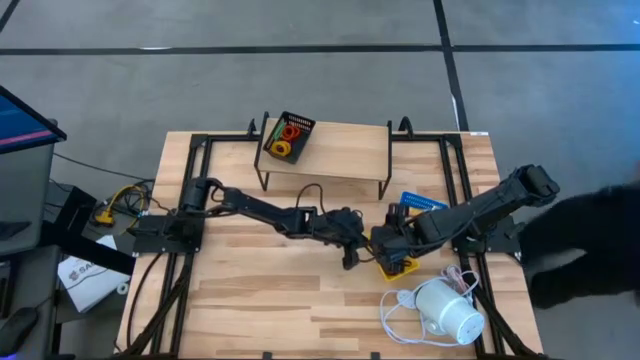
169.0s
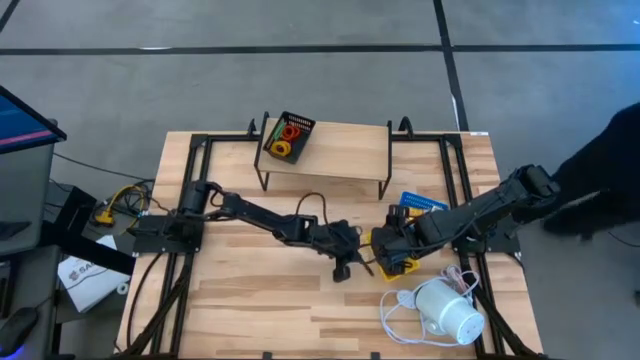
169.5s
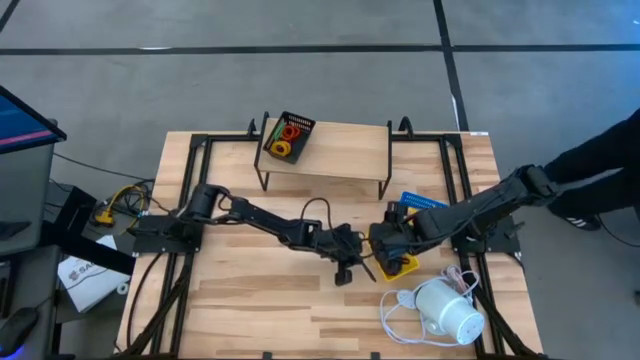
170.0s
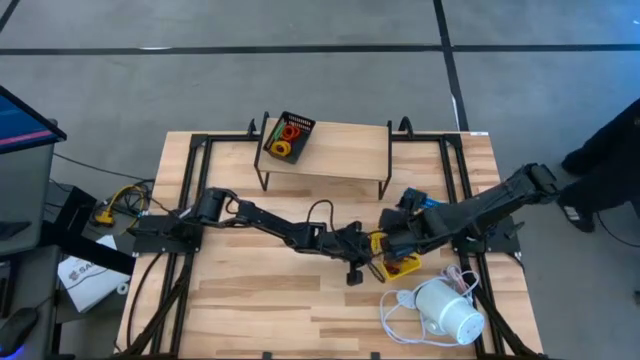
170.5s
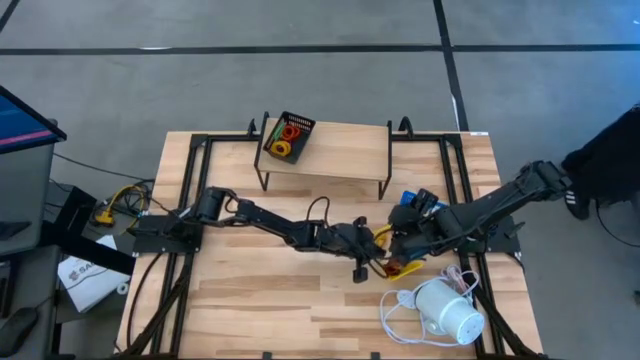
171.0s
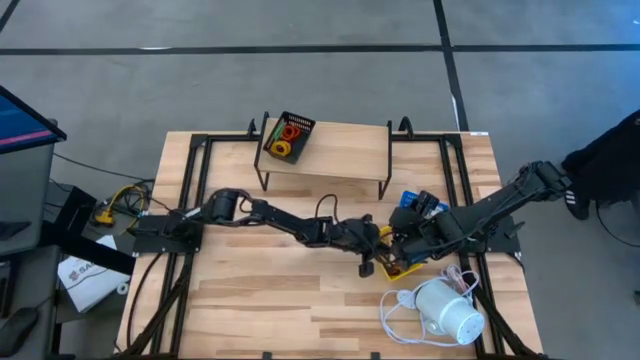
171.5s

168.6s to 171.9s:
Task: Pick & Place Office Desk Supplies
Adjust the light brown rubber band in the yellow bin

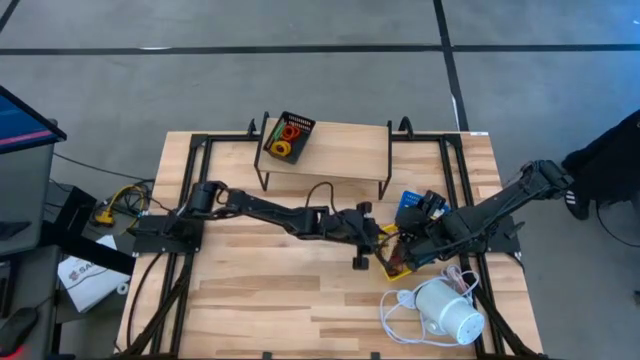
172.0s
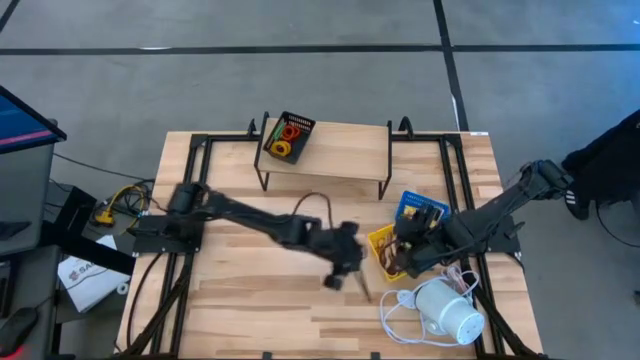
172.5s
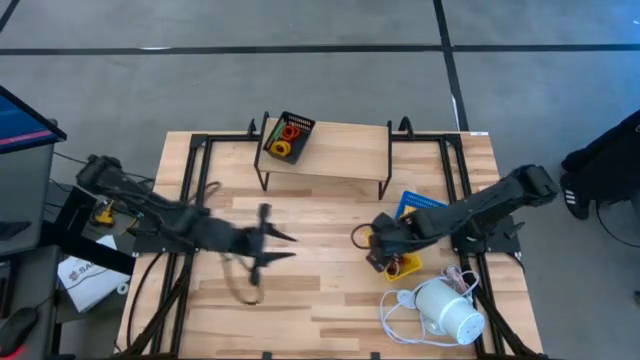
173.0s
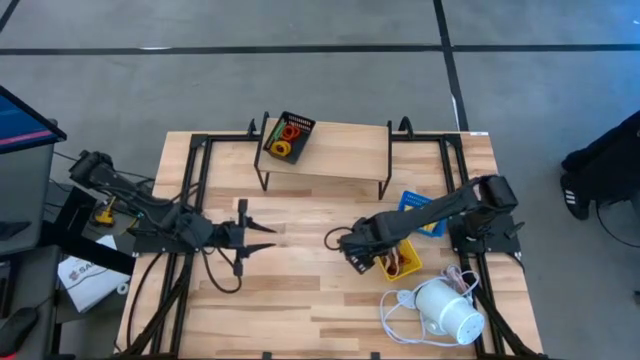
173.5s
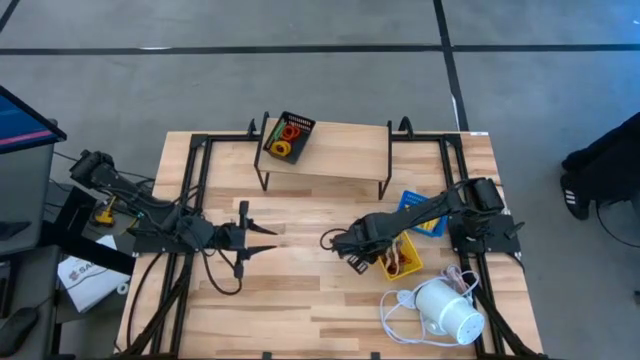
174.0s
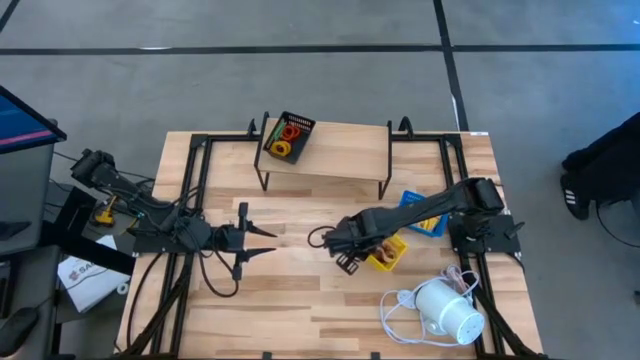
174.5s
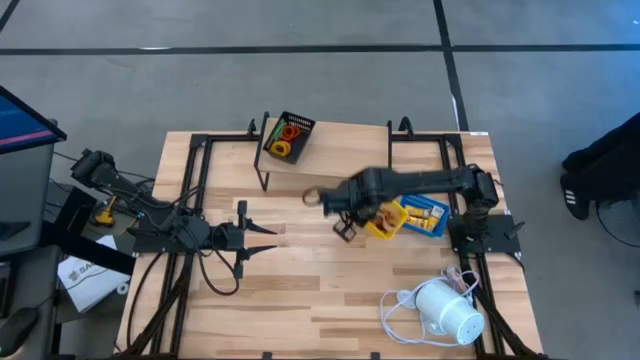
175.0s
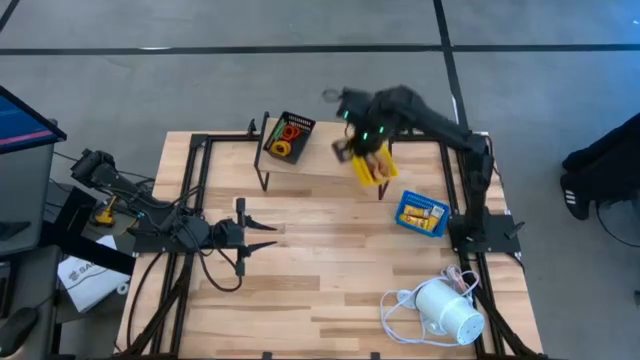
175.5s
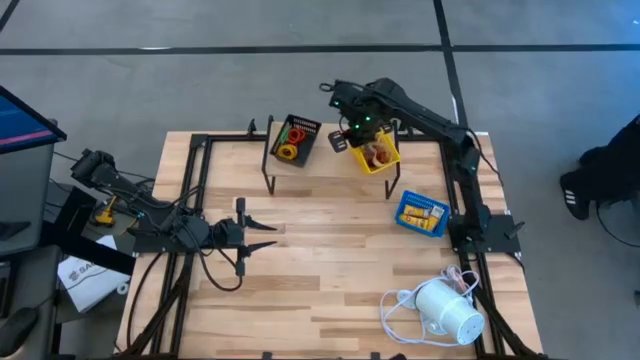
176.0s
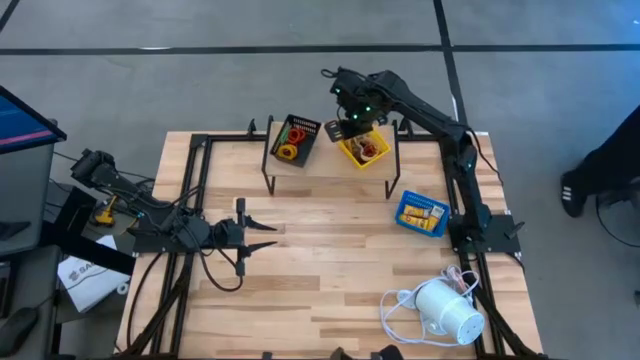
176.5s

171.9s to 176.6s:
Put the yellow bin on the shelf

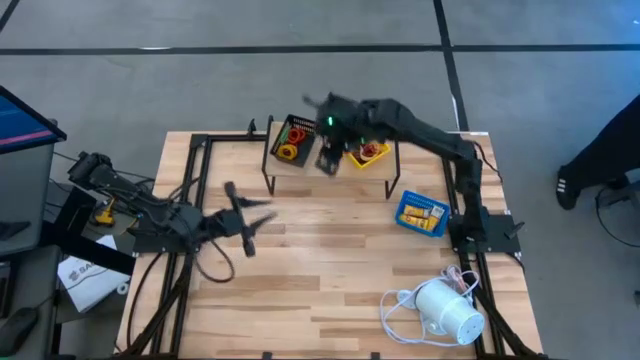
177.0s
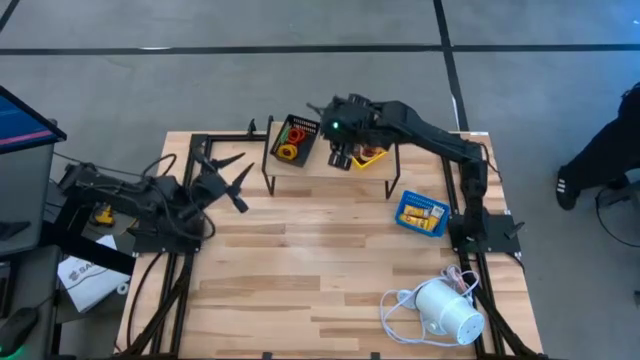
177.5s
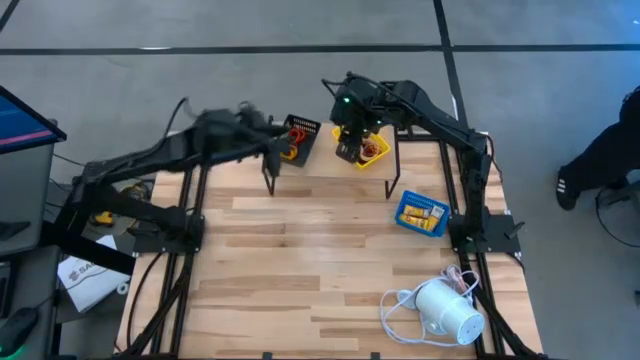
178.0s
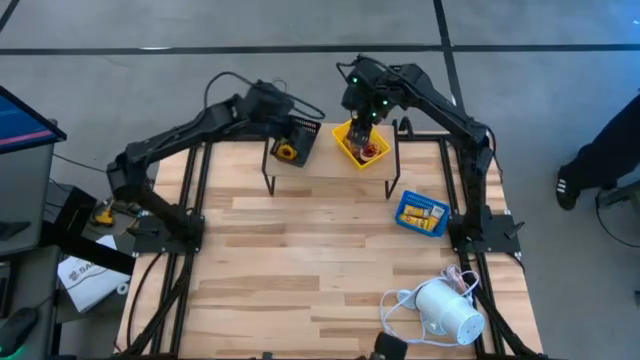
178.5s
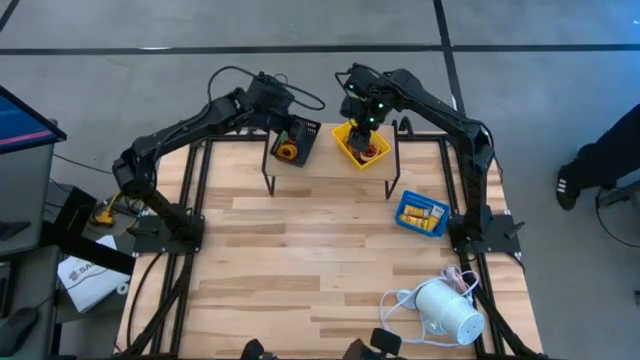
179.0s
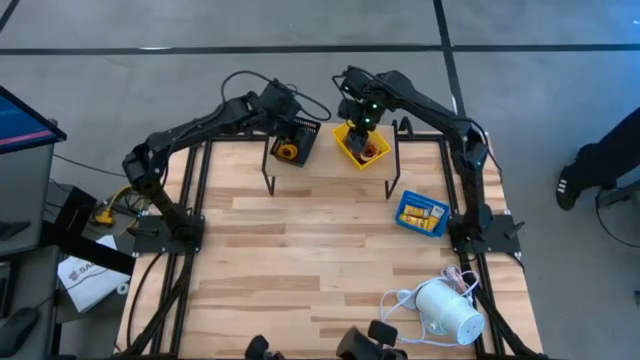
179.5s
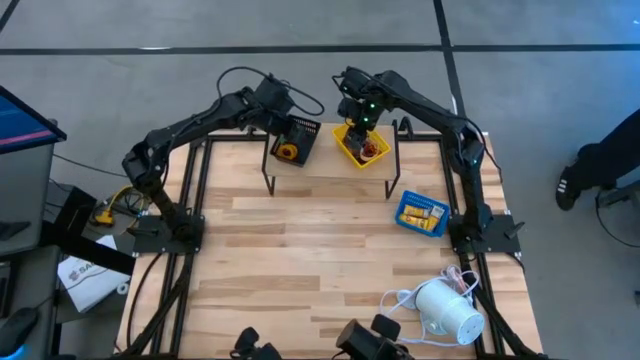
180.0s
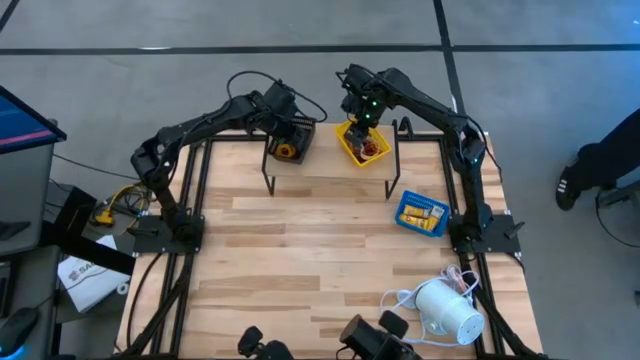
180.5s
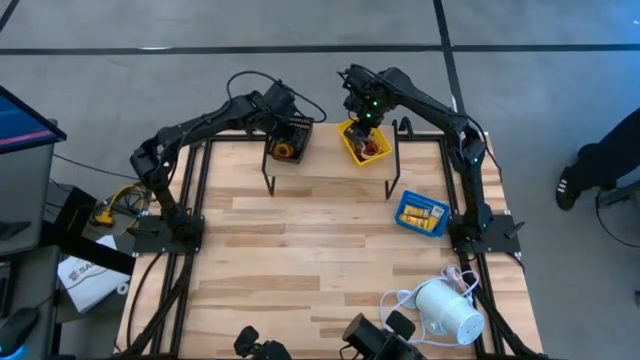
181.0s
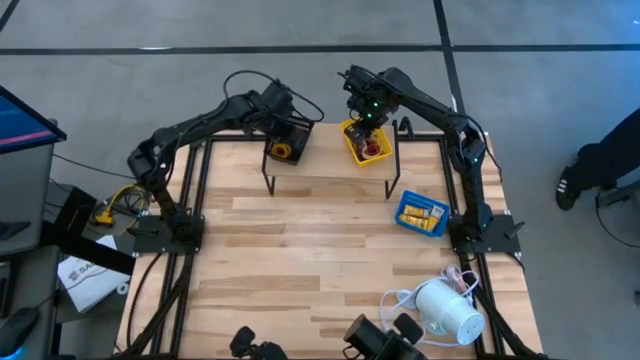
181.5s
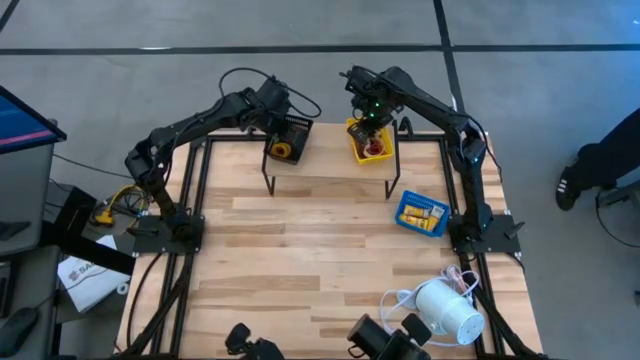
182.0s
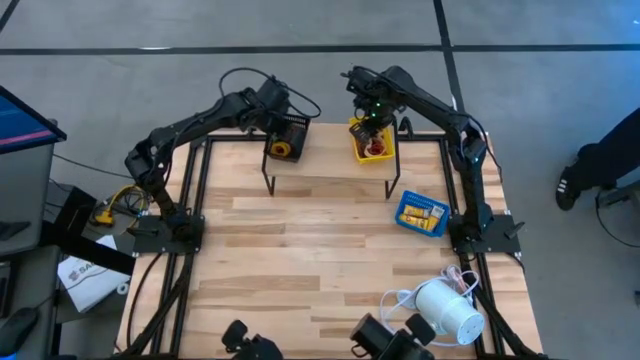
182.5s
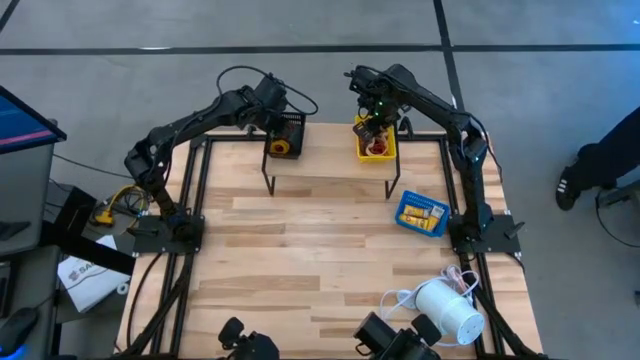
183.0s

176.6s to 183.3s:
Adjust the bins on the shelf
